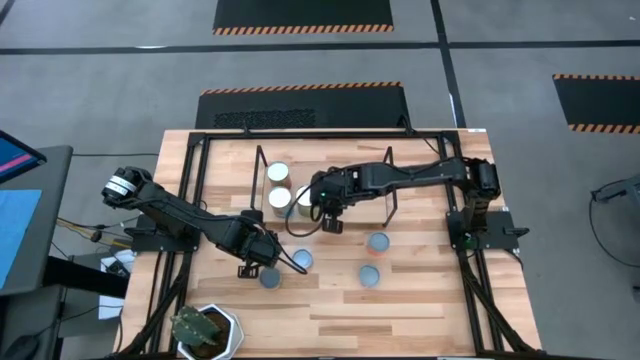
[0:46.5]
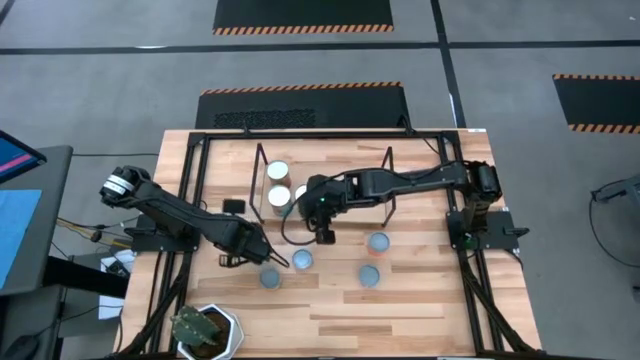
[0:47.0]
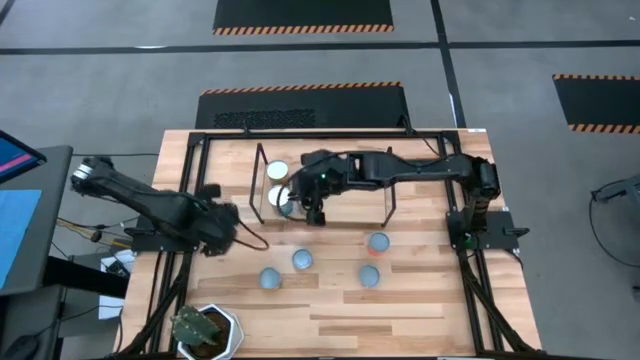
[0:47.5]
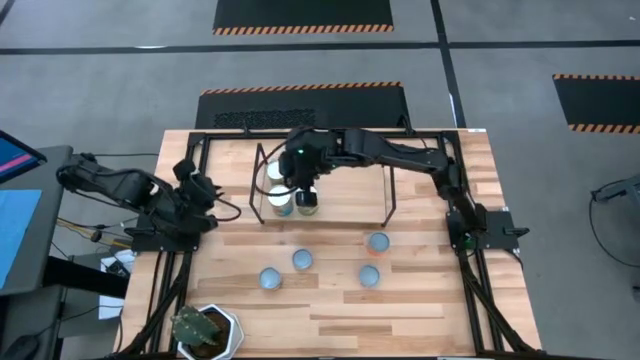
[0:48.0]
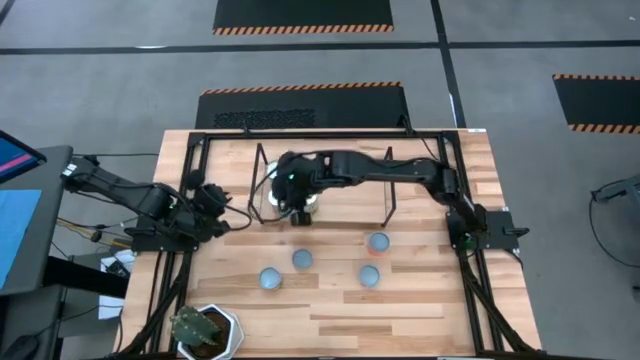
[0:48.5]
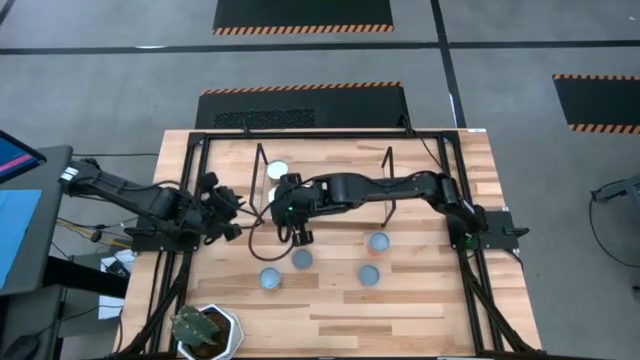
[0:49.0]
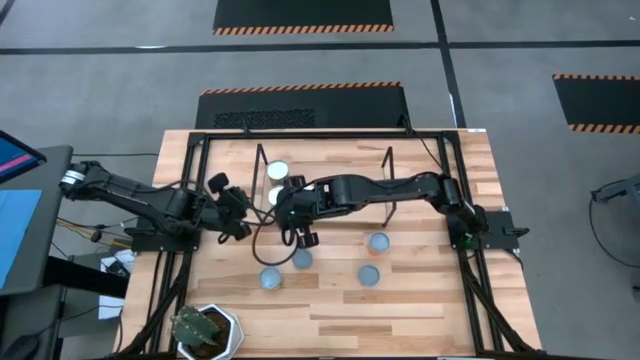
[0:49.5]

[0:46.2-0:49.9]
Task: Pick and place cans onto a shelf
Adjust the shelf

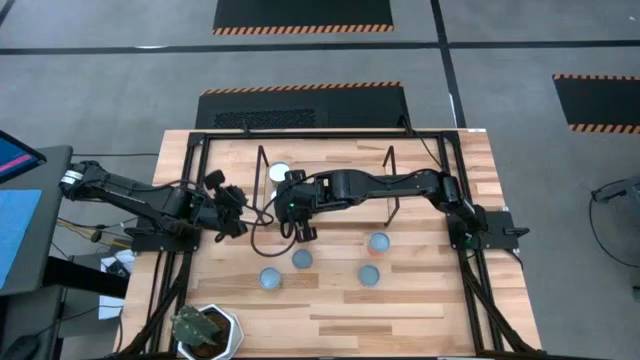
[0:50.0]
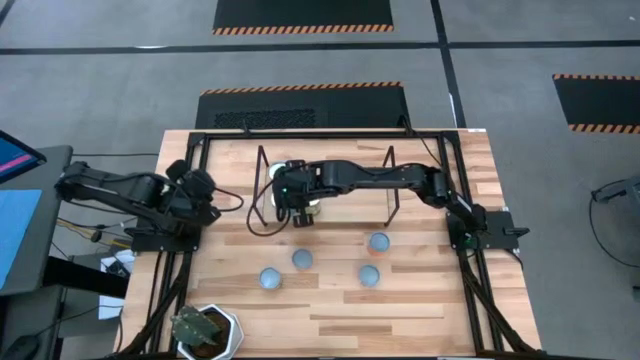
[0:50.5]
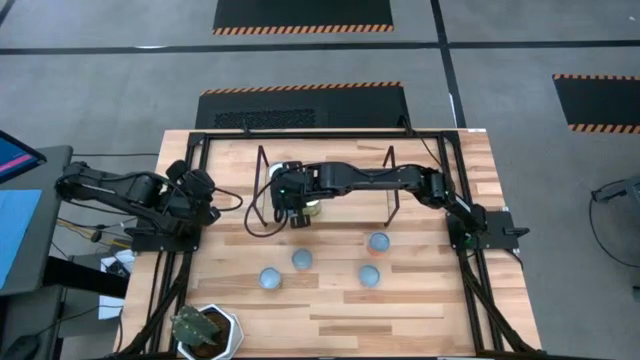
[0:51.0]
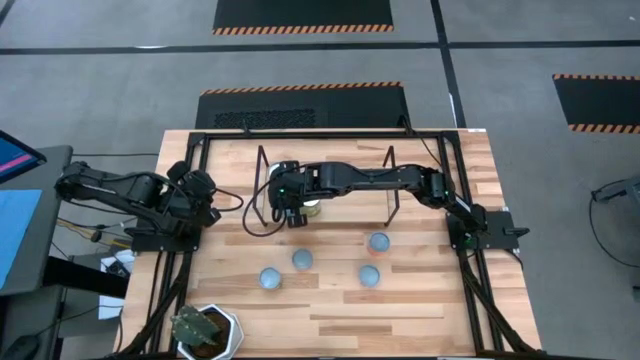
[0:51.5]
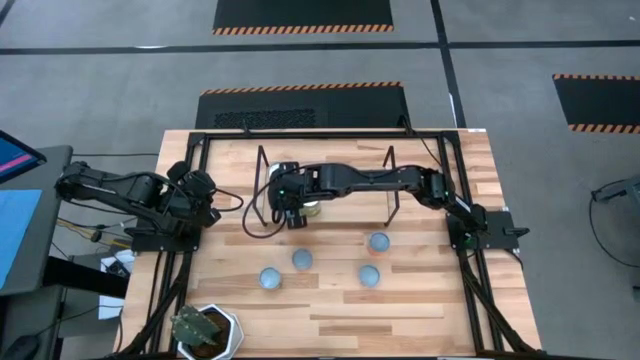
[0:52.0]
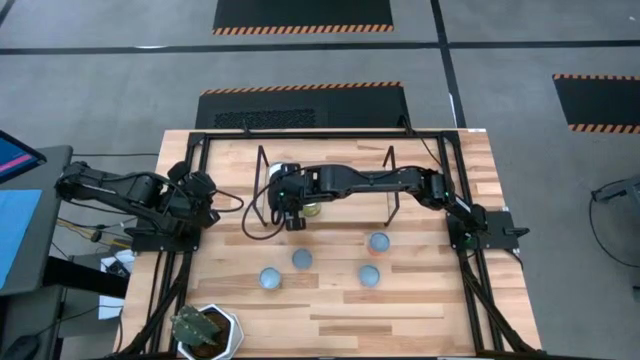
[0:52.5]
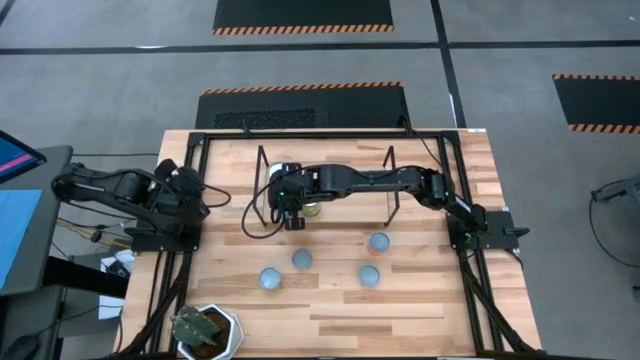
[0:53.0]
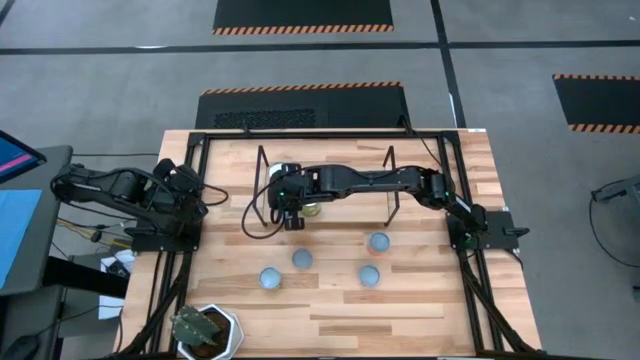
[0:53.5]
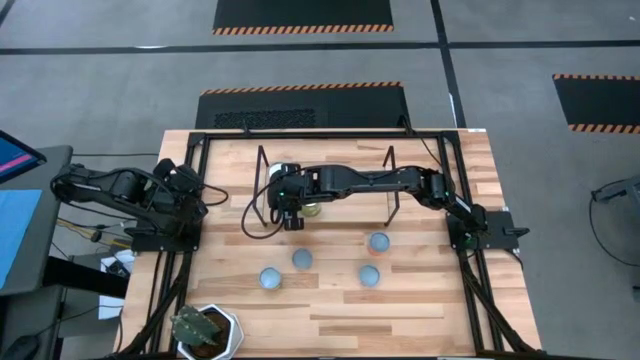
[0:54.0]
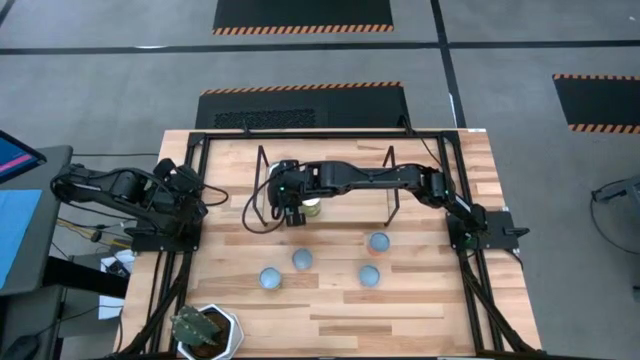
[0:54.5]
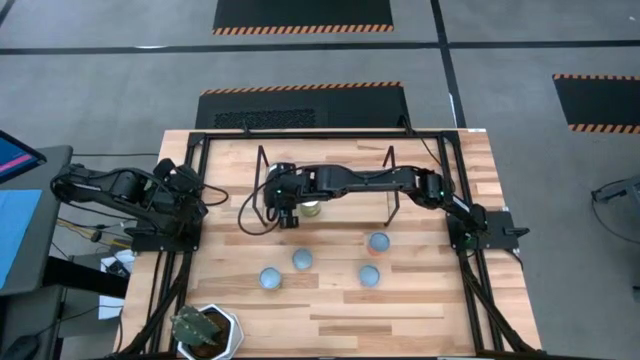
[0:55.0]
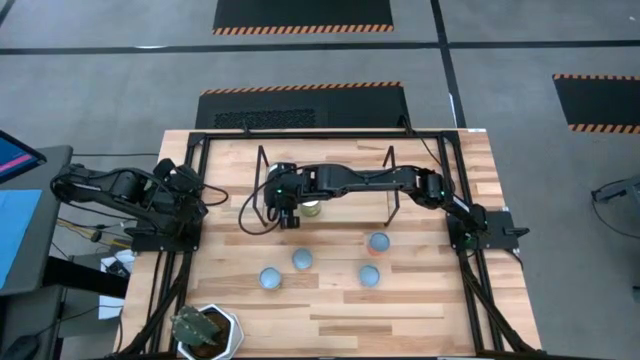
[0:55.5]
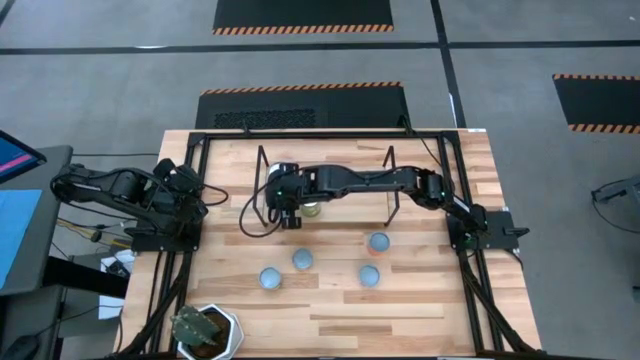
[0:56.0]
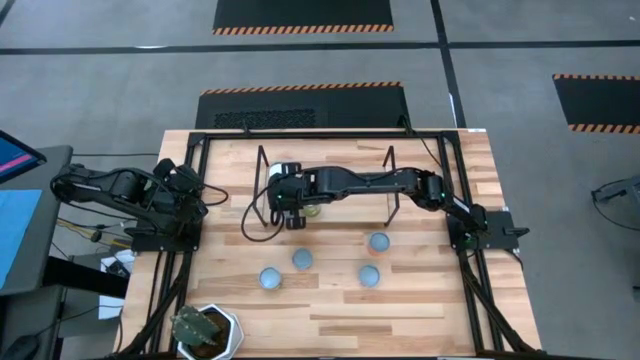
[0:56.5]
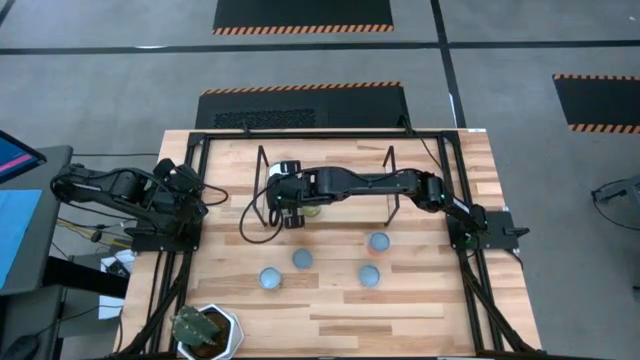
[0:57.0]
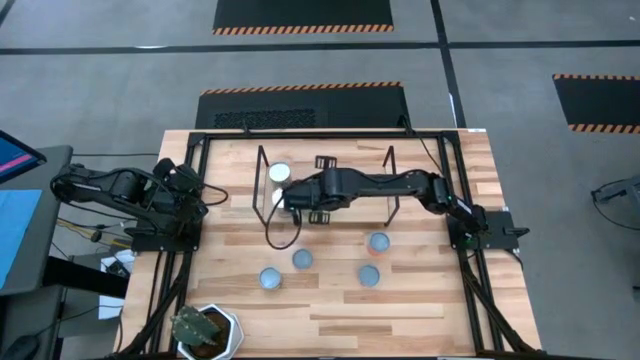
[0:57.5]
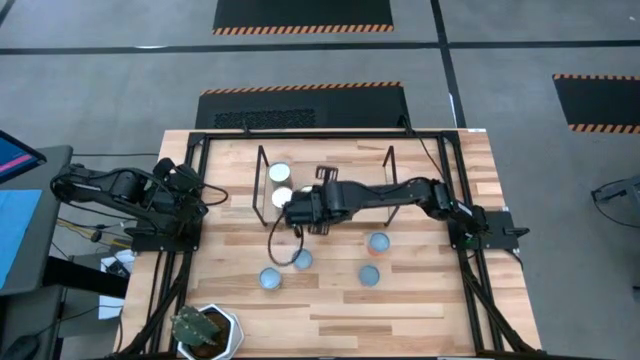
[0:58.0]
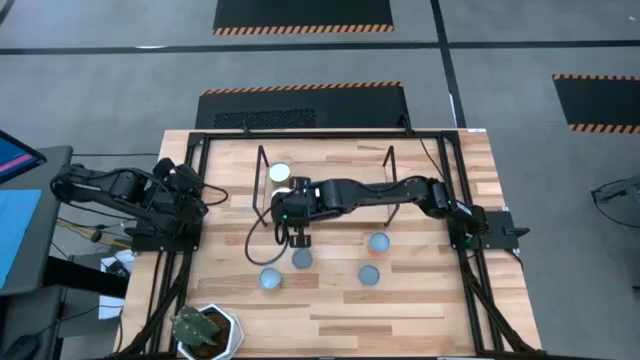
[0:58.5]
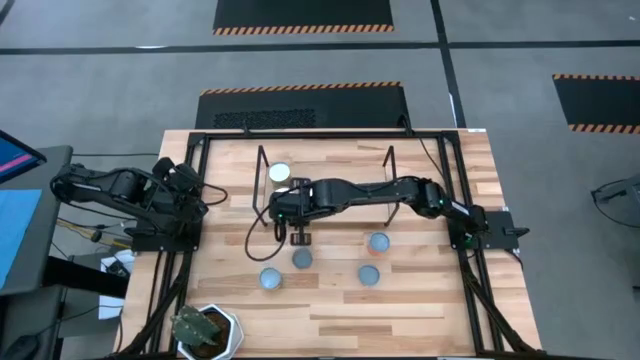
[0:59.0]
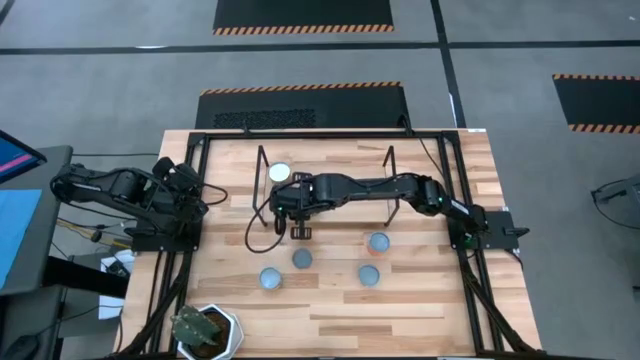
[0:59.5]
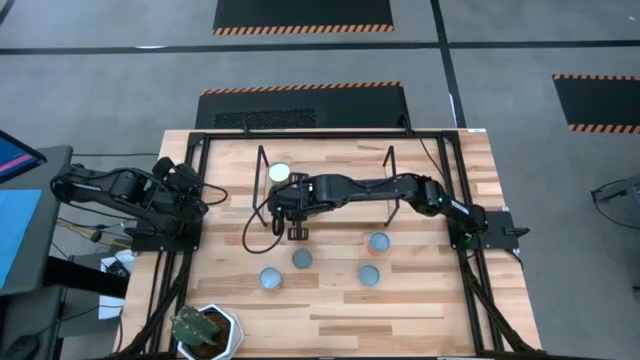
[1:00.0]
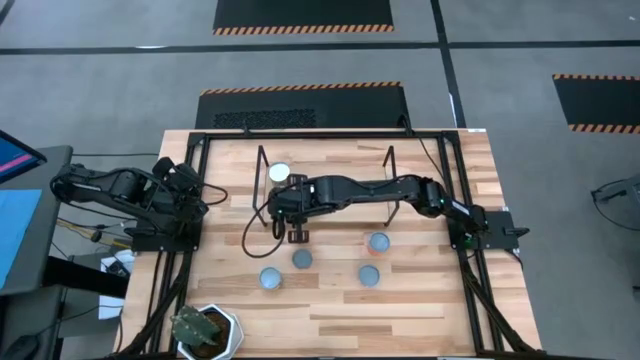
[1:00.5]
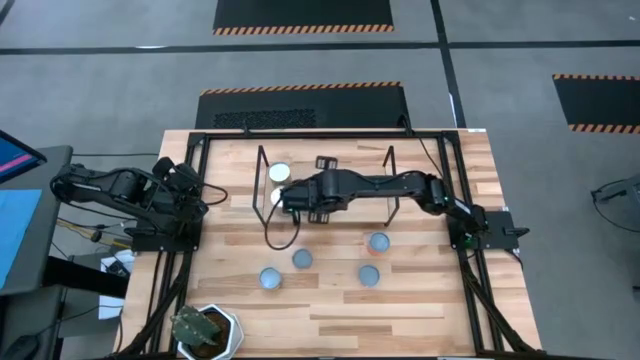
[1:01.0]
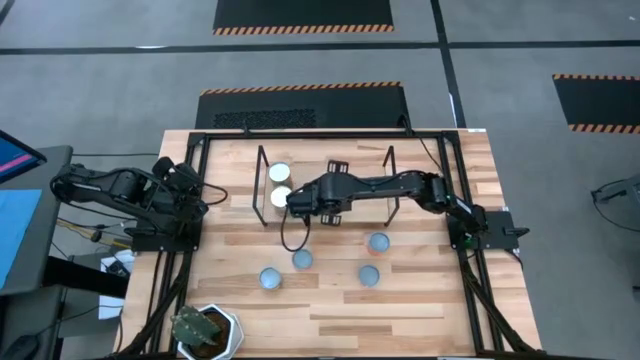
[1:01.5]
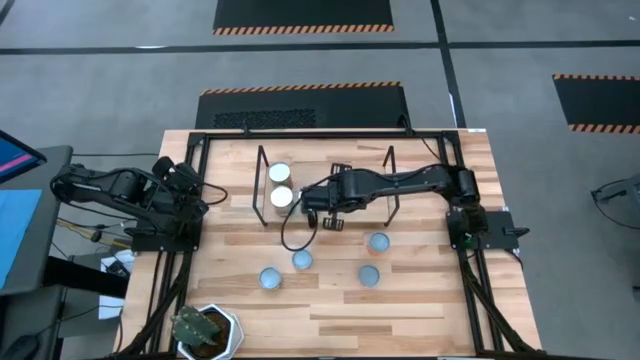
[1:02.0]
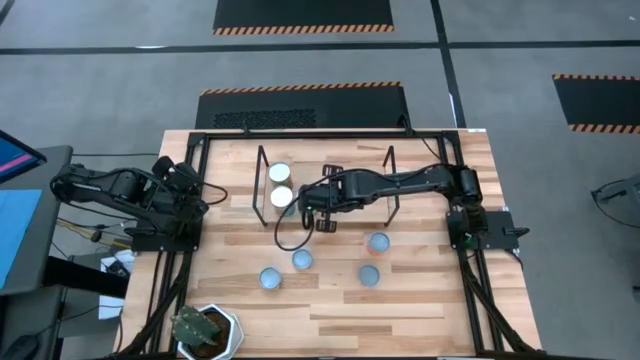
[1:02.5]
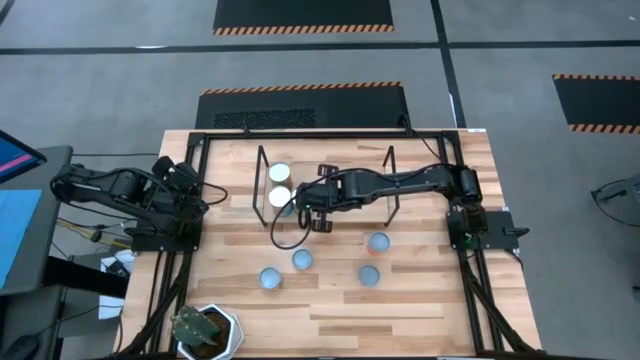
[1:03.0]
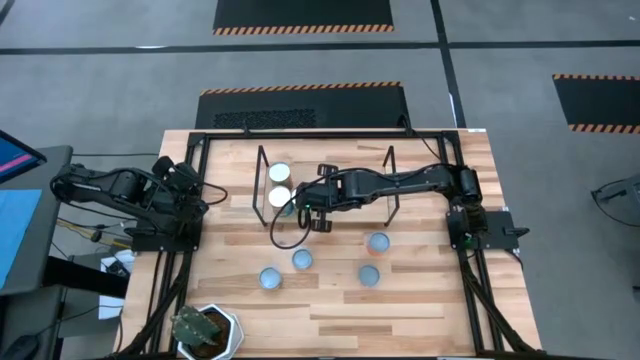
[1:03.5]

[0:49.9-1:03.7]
Adjust the canned goods on the shelf

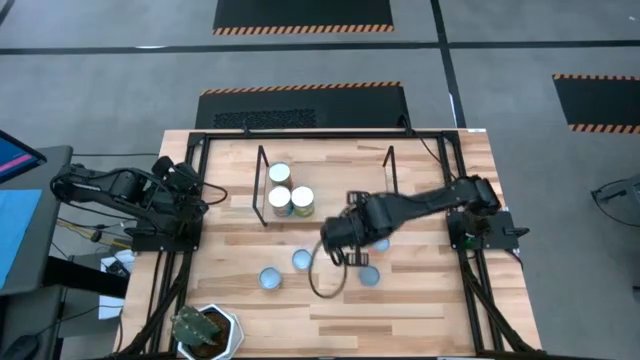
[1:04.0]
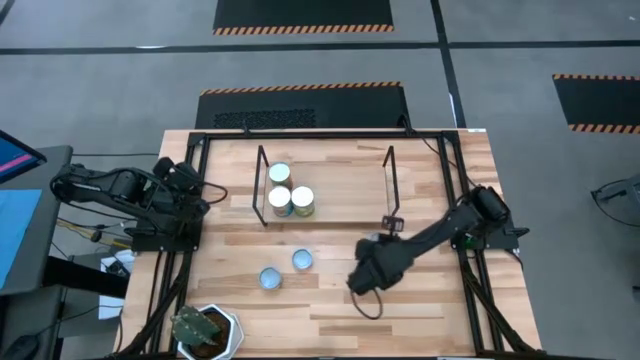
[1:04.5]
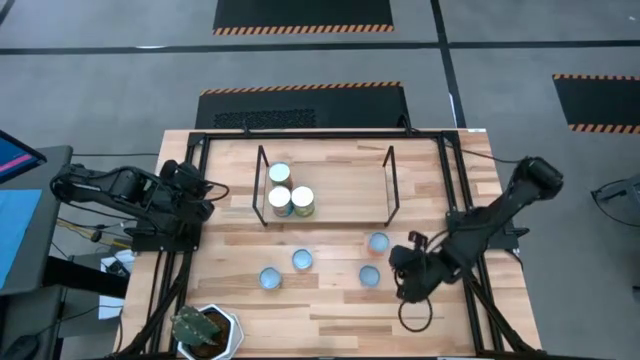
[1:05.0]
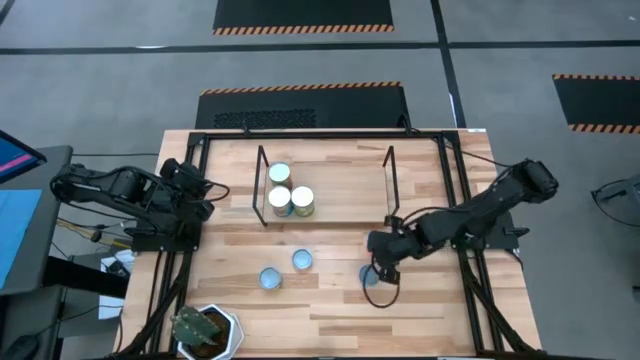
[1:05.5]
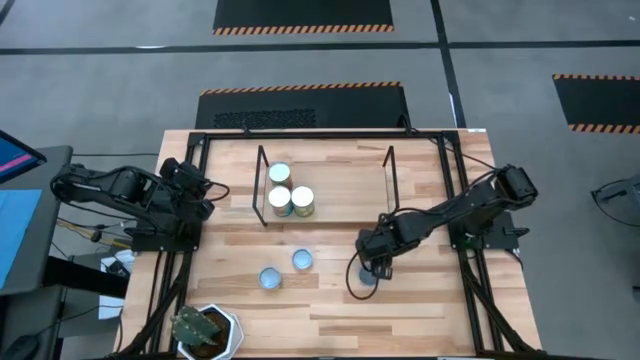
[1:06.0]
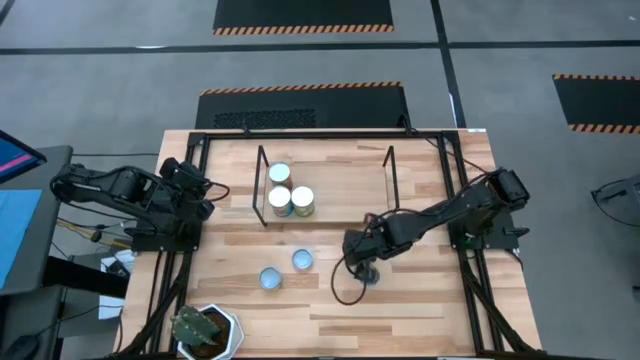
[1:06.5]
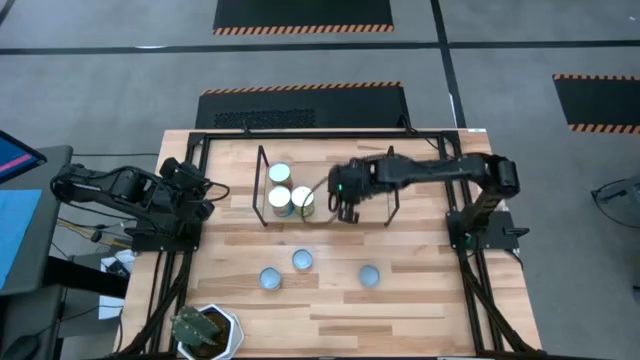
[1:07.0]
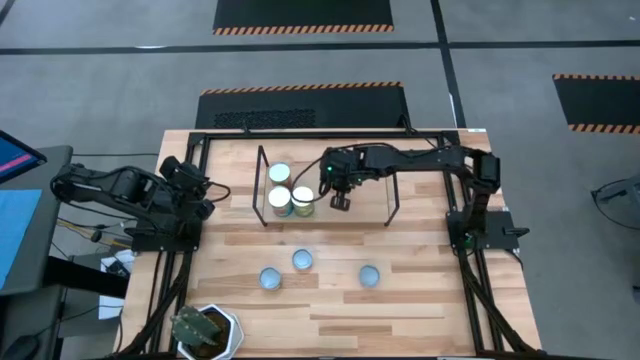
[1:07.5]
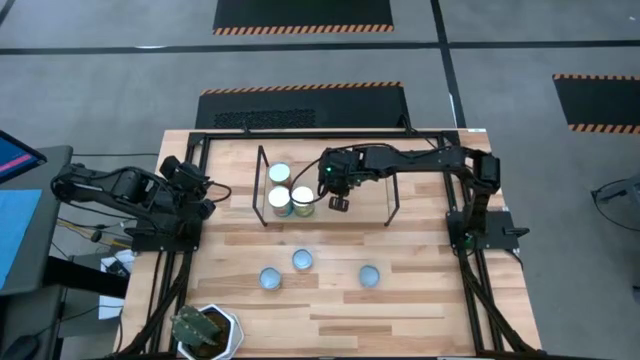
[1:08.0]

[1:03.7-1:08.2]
Put the canned saucy meatballs on the shelf
